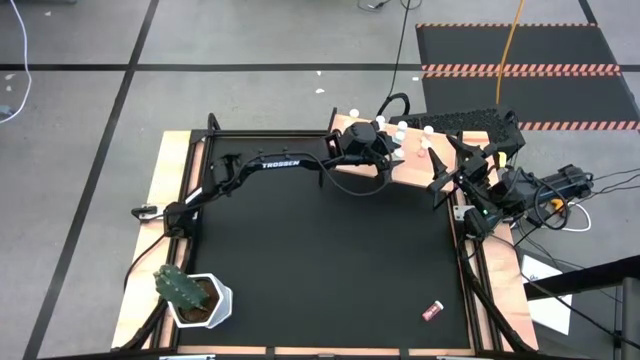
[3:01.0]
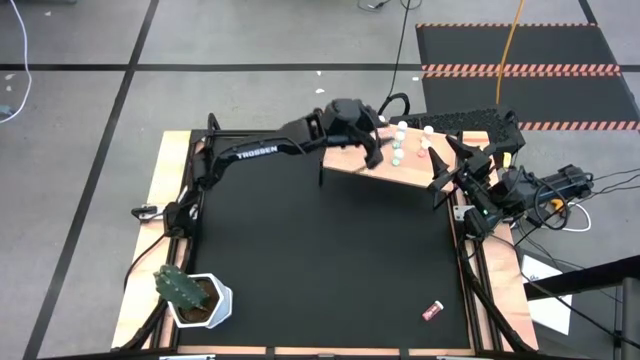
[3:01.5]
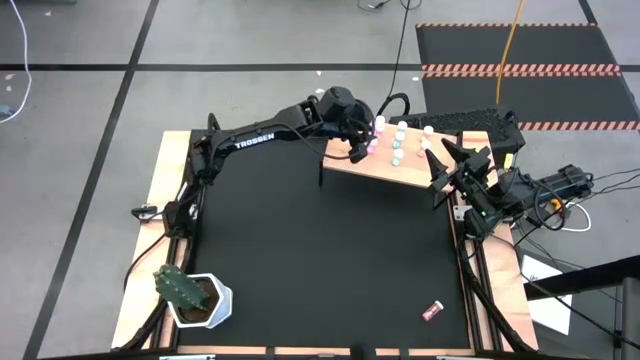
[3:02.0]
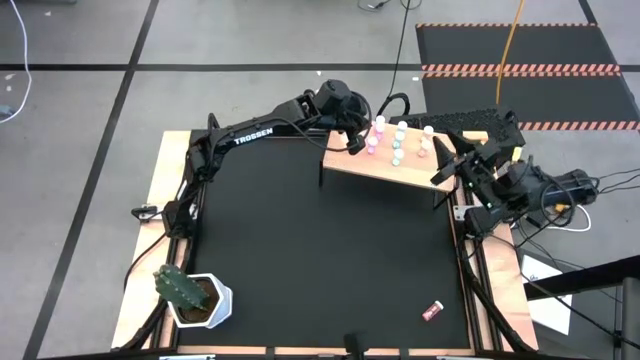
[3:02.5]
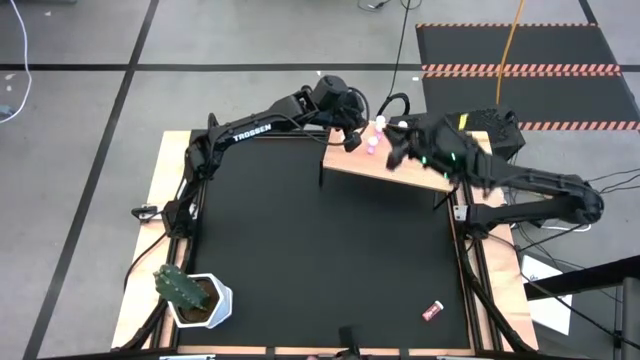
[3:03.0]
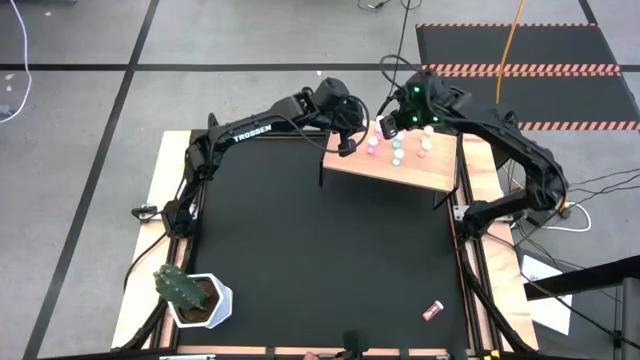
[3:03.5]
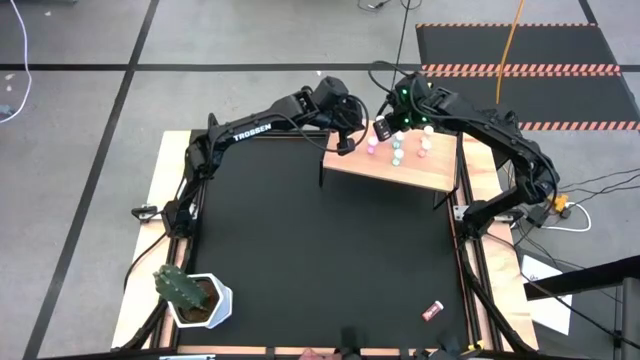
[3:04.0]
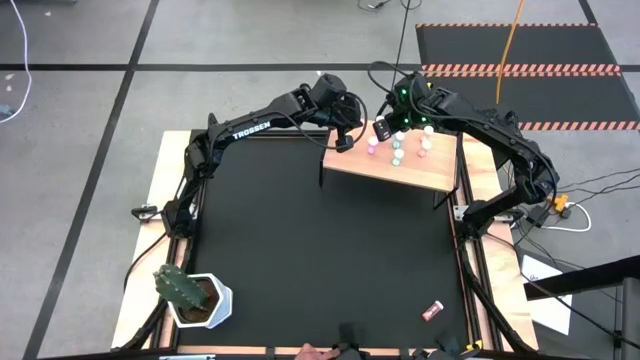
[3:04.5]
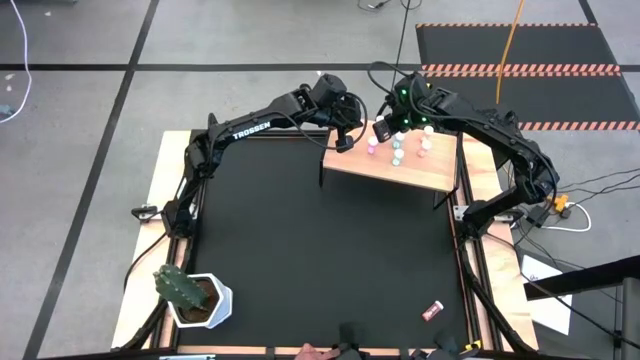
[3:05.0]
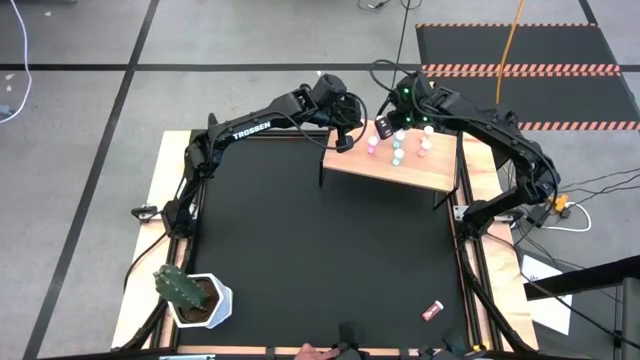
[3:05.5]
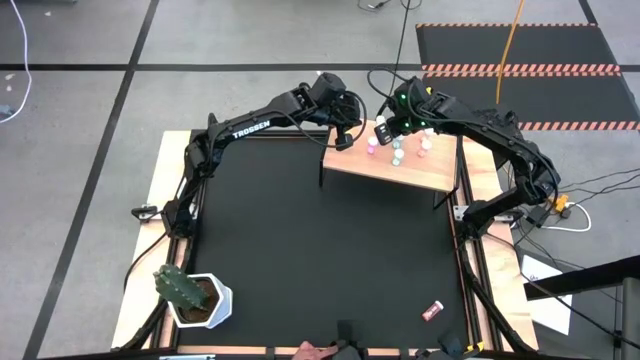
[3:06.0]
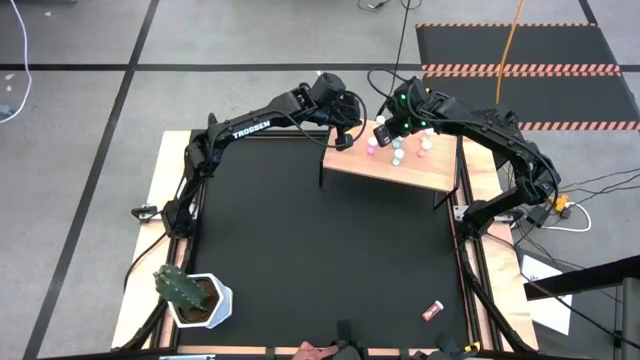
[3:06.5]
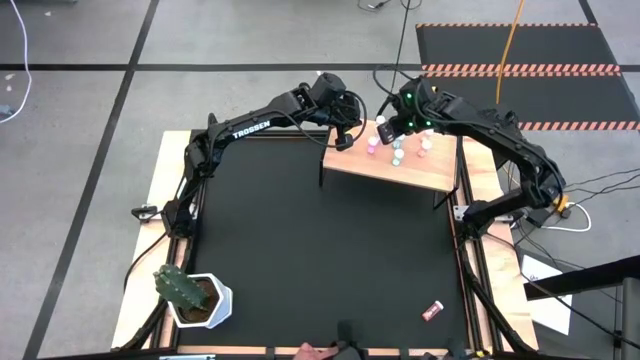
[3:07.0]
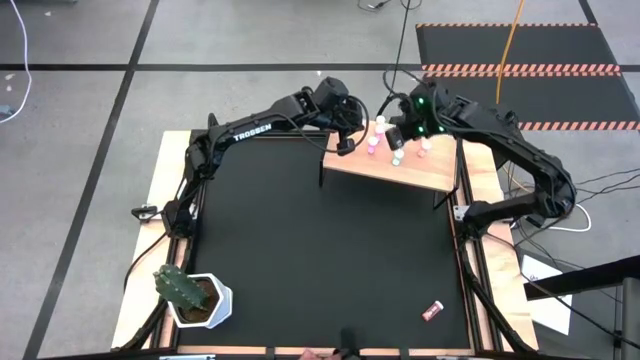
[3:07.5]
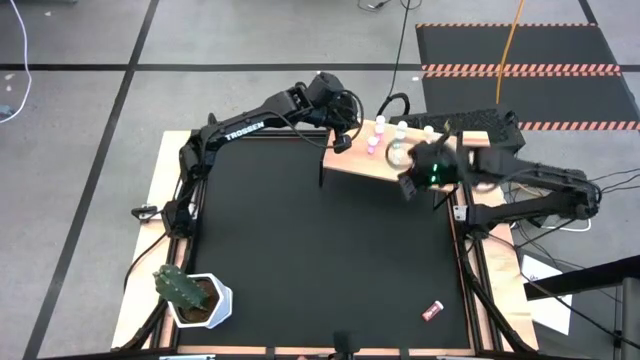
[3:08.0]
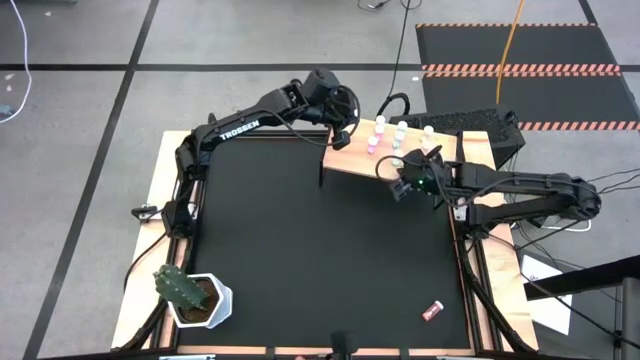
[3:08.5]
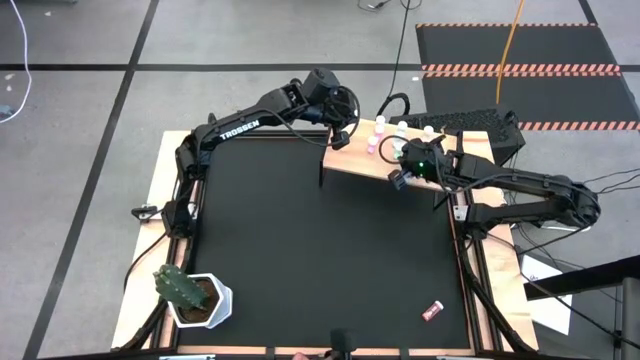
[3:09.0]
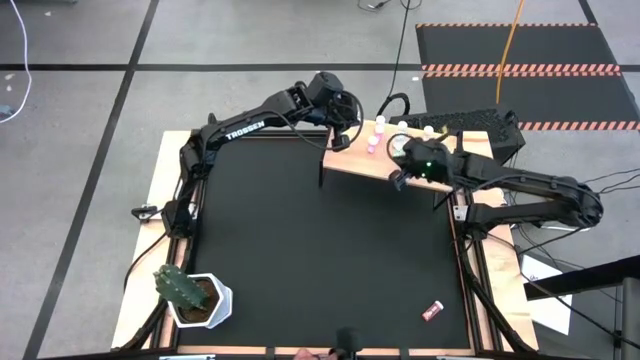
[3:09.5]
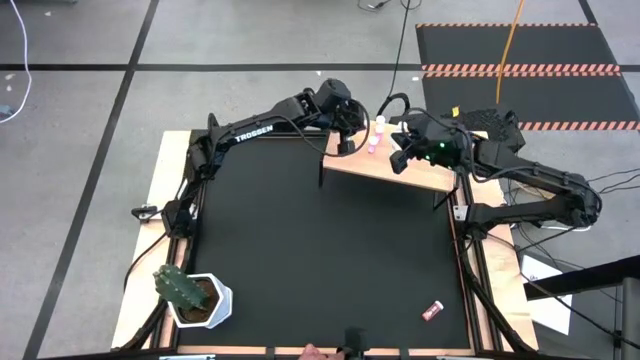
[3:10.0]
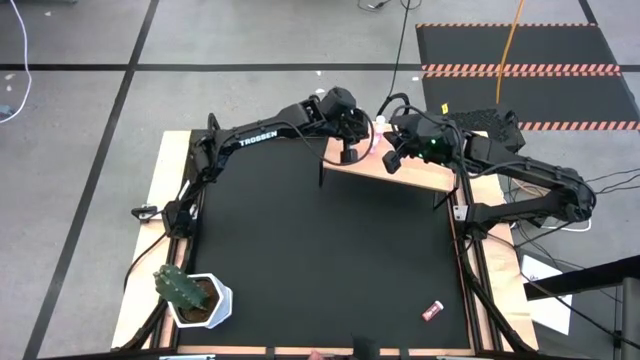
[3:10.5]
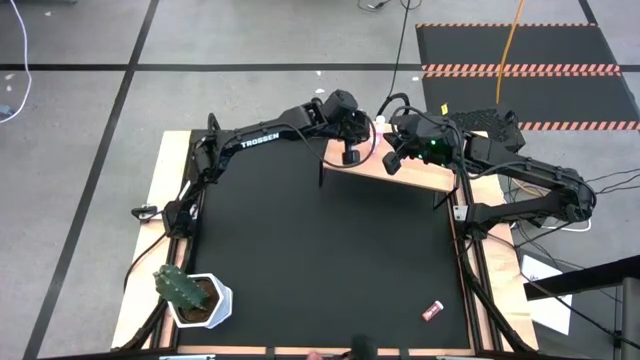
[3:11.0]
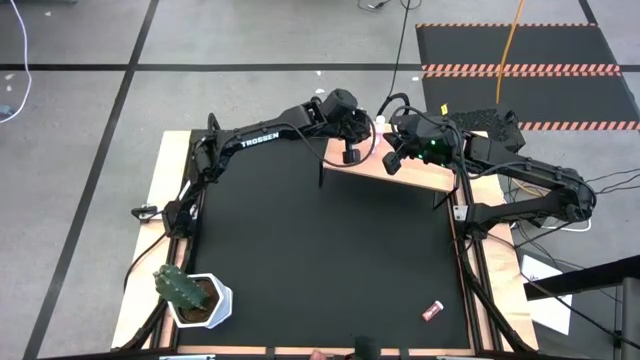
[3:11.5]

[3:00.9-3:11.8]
Task: Pick and place medicine bottles onto shelf by color
Adjust the pill bottles on the shelf

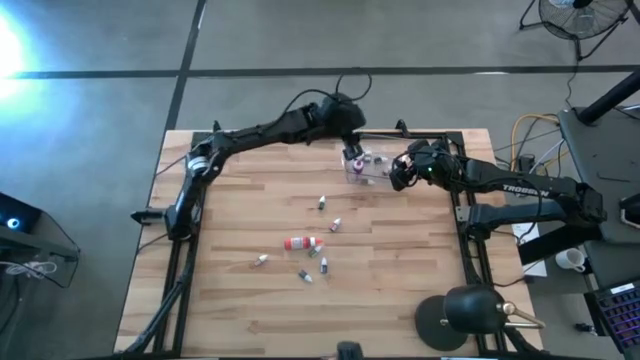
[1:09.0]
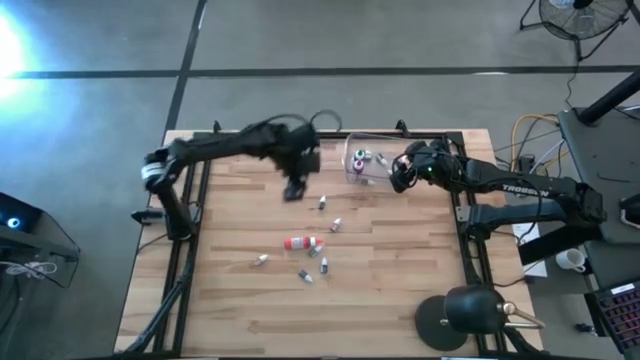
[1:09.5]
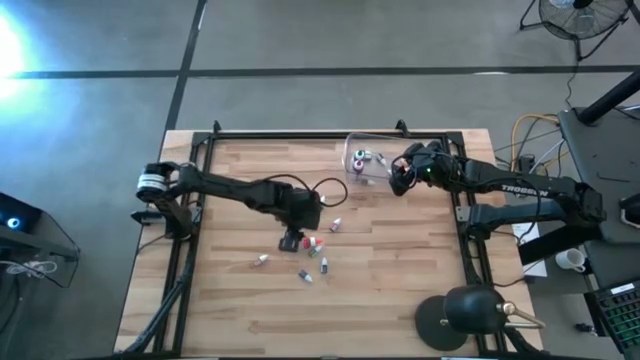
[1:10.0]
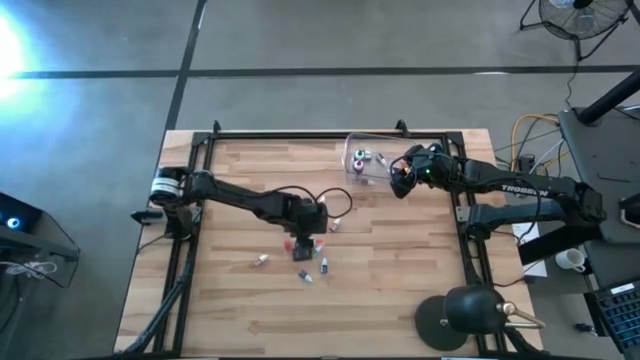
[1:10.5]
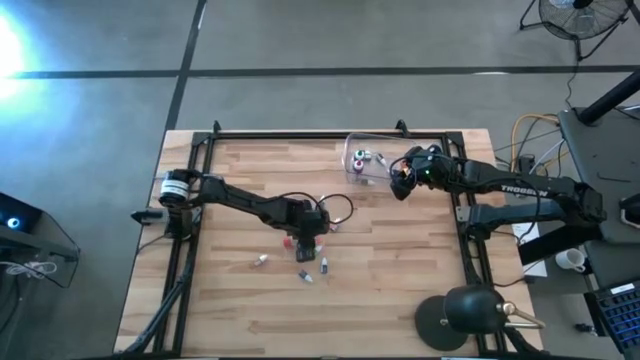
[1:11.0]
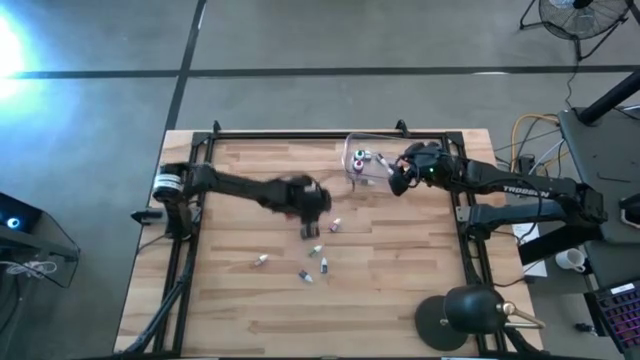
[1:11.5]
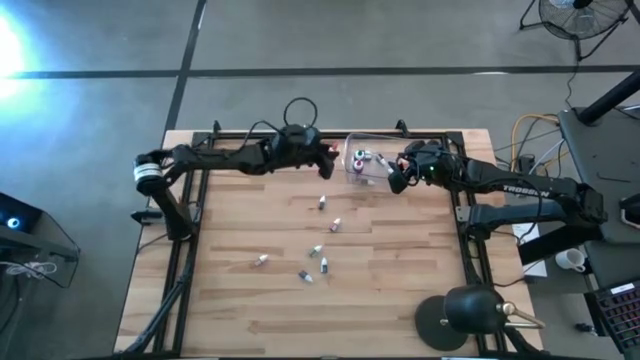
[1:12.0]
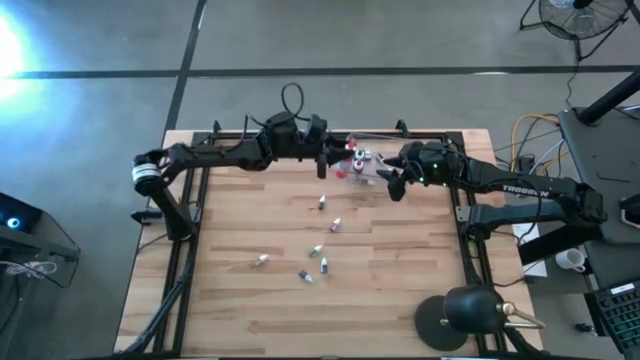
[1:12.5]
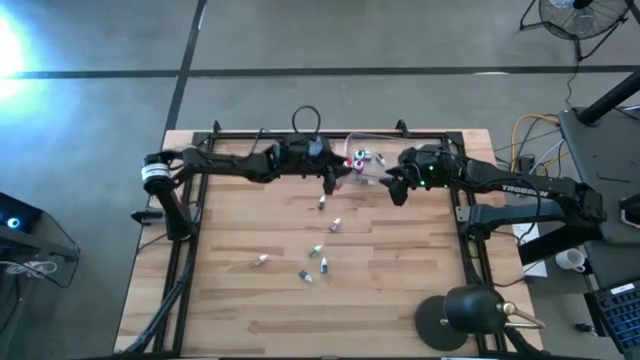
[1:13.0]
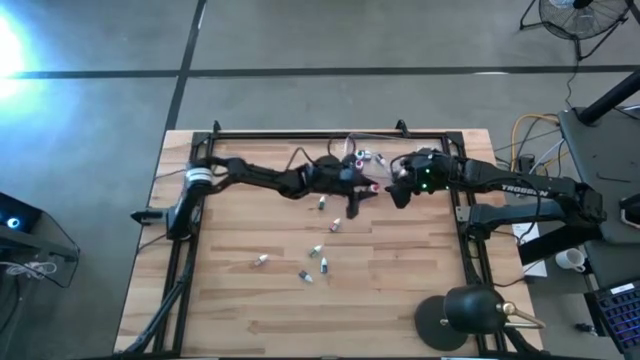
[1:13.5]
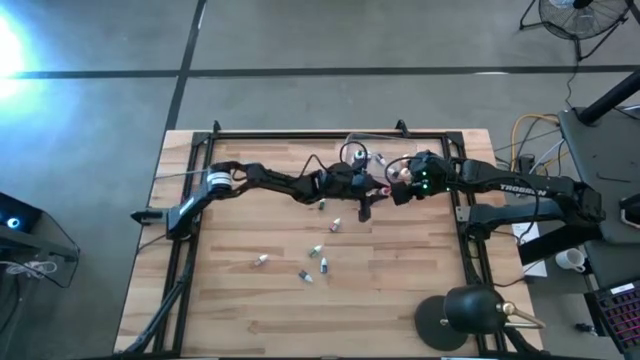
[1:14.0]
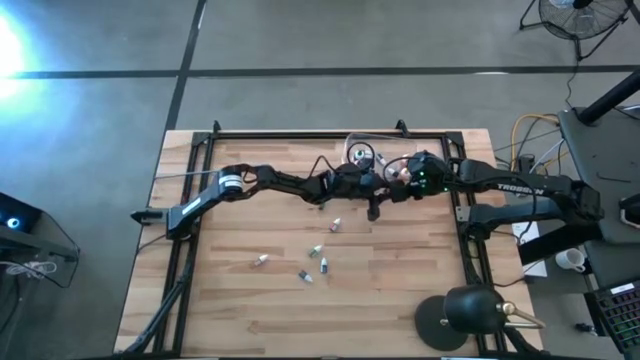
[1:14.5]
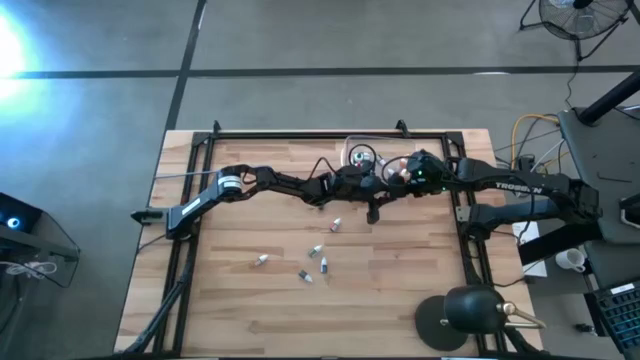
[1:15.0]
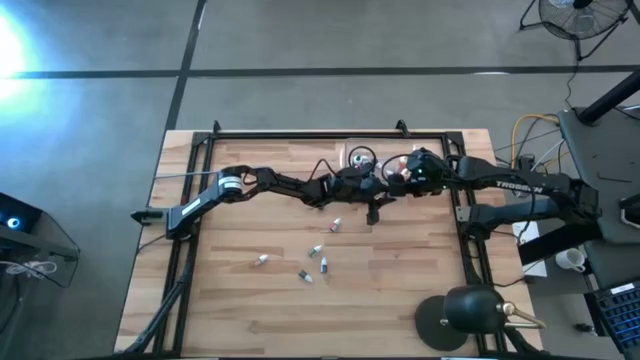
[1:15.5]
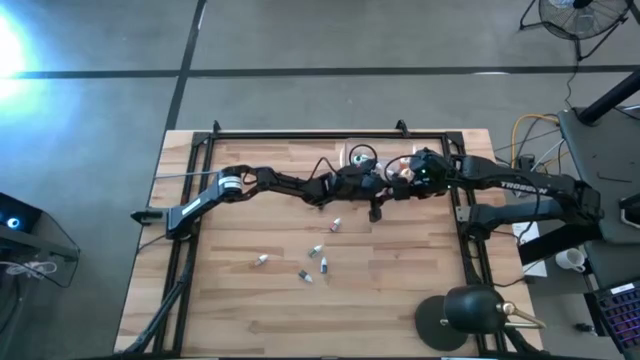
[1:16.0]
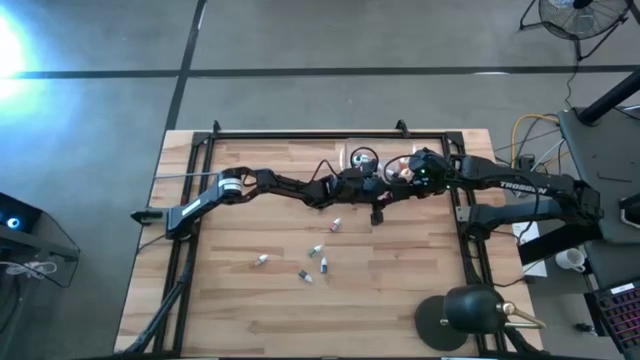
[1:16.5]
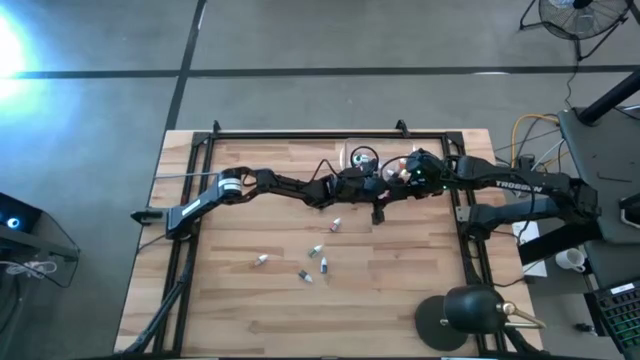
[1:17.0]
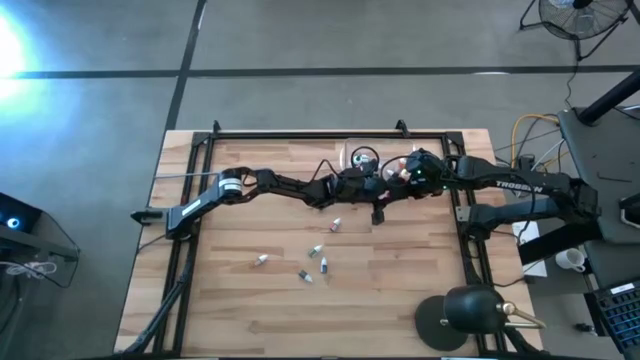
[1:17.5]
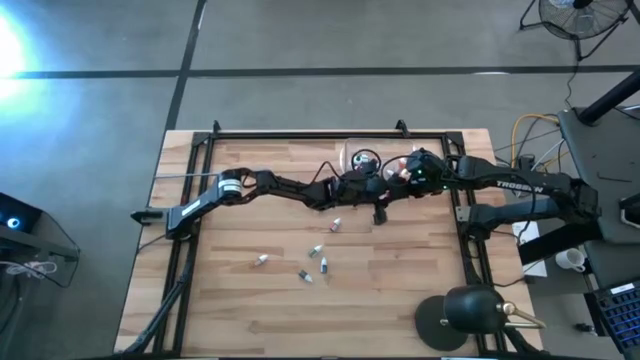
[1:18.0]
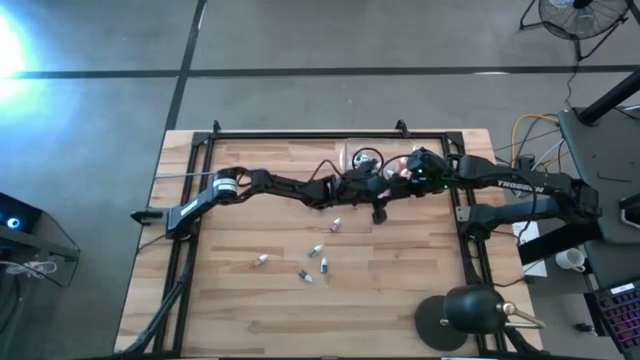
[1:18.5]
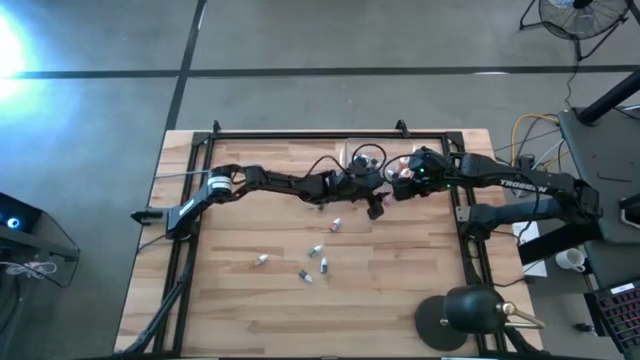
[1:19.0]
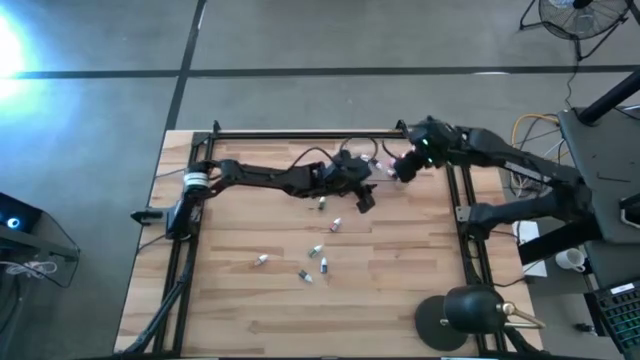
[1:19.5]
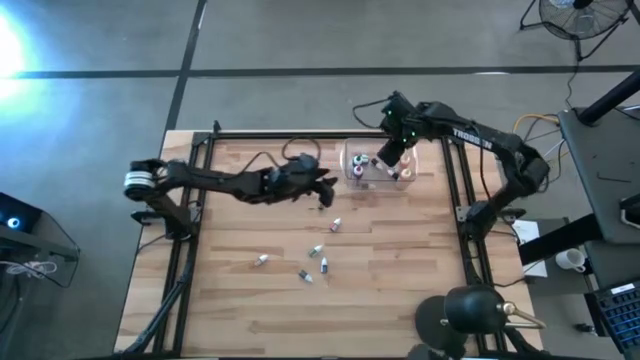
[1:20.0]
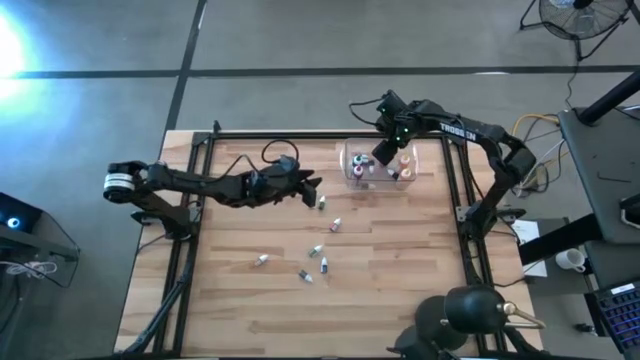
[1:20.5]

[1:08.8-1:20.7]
Task: Pick & Place food coloring
Put the large orange food coloring bottle into the transparent bin
